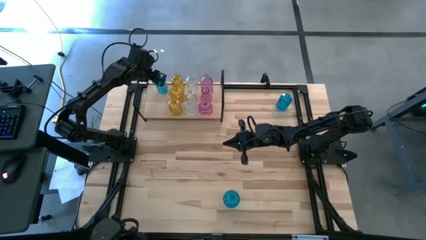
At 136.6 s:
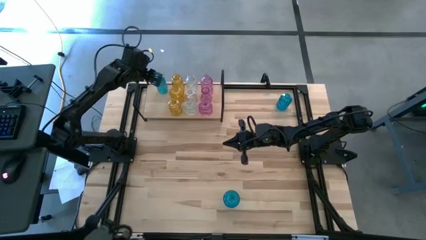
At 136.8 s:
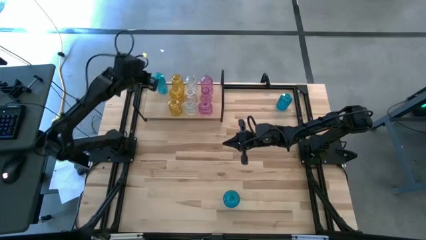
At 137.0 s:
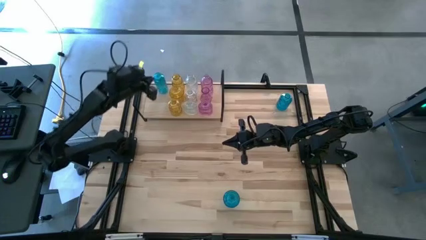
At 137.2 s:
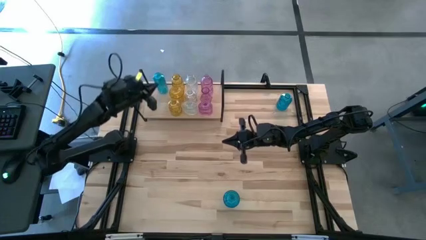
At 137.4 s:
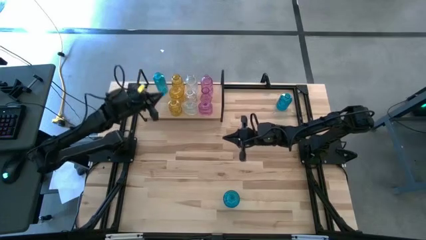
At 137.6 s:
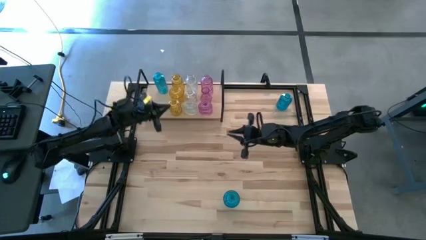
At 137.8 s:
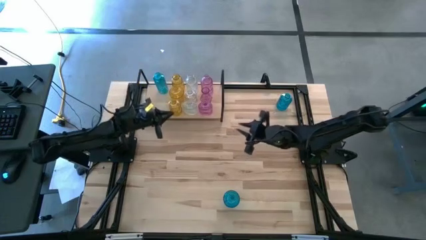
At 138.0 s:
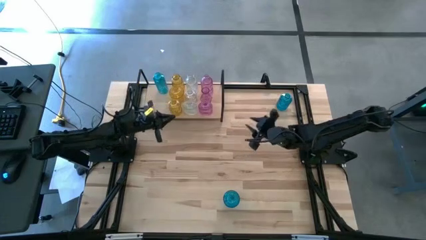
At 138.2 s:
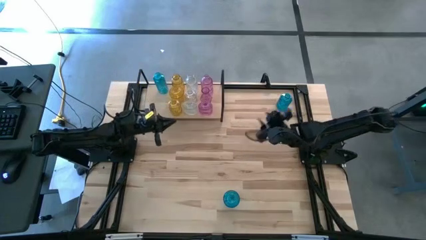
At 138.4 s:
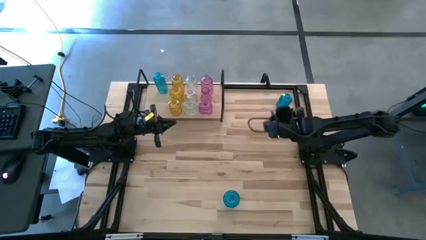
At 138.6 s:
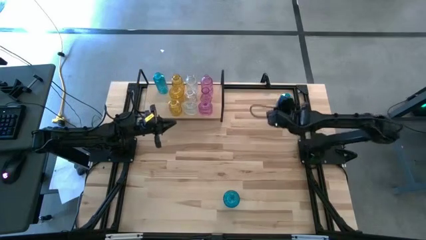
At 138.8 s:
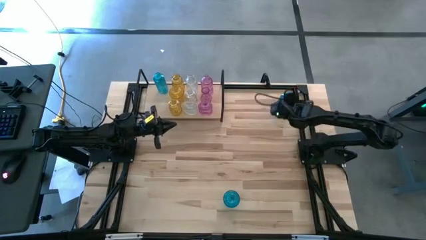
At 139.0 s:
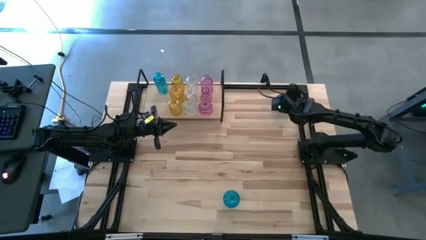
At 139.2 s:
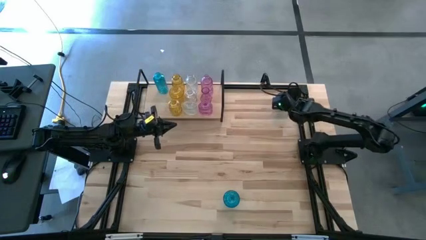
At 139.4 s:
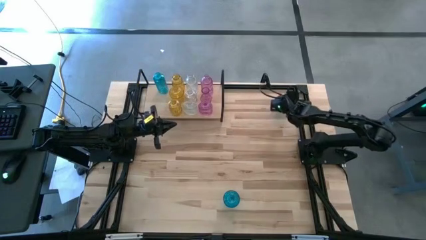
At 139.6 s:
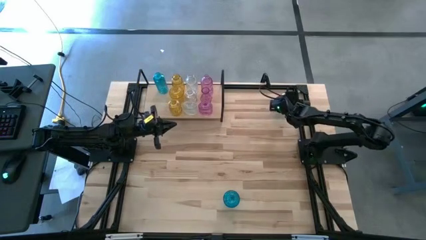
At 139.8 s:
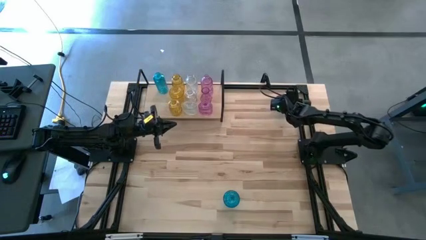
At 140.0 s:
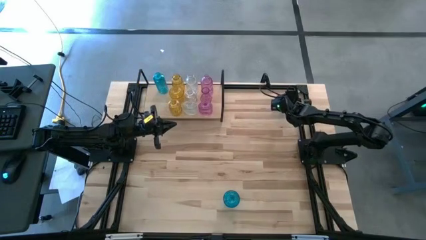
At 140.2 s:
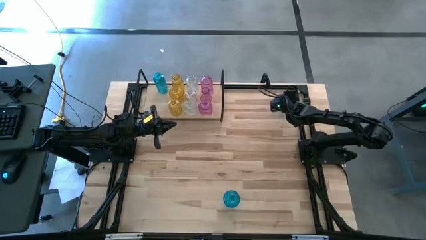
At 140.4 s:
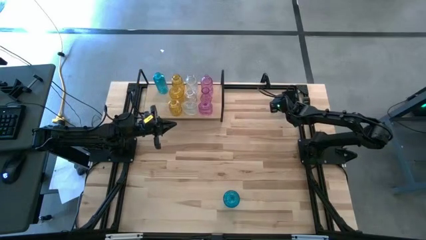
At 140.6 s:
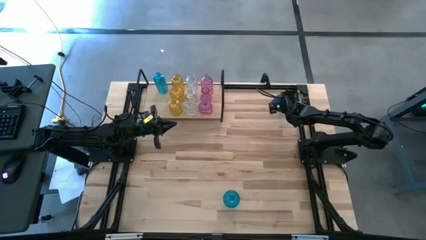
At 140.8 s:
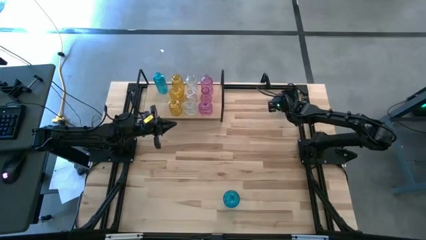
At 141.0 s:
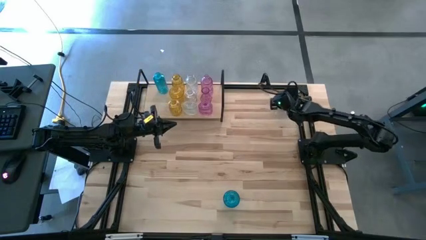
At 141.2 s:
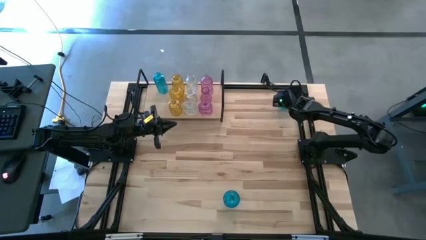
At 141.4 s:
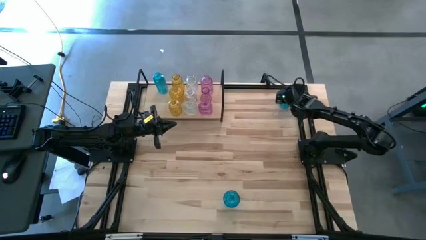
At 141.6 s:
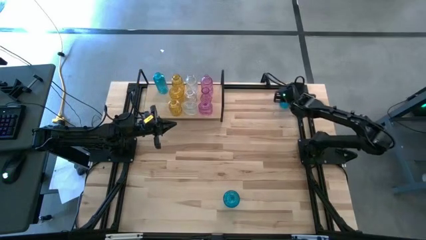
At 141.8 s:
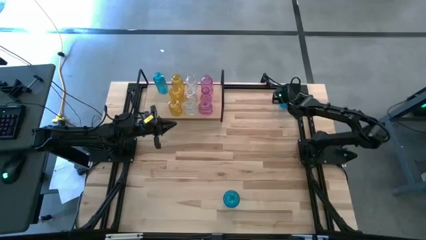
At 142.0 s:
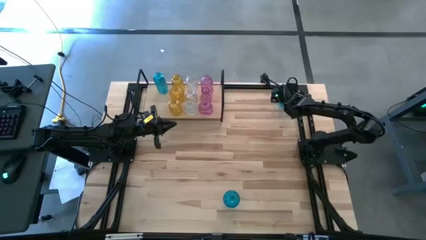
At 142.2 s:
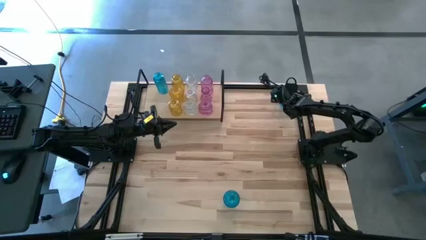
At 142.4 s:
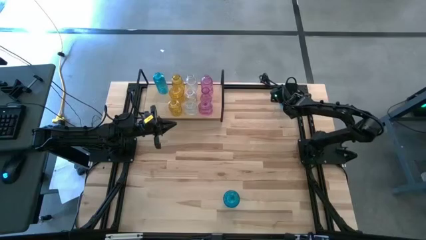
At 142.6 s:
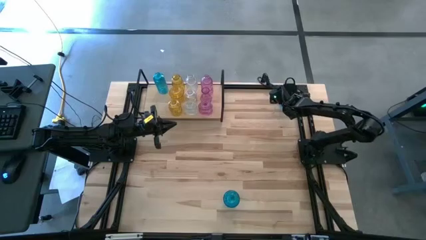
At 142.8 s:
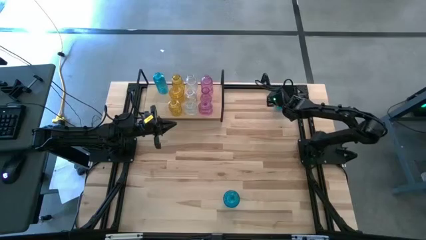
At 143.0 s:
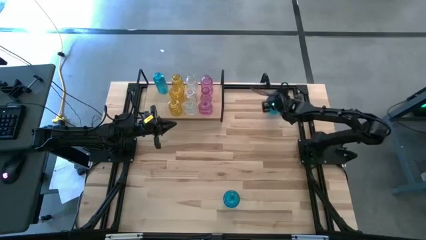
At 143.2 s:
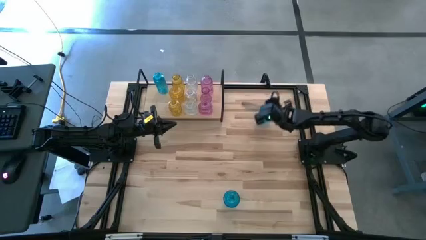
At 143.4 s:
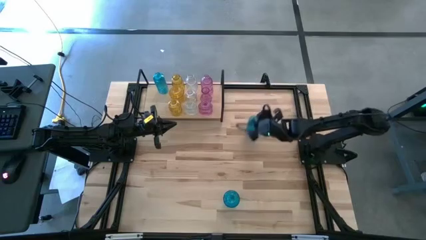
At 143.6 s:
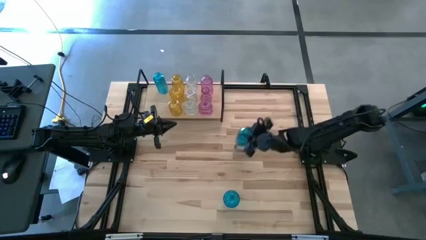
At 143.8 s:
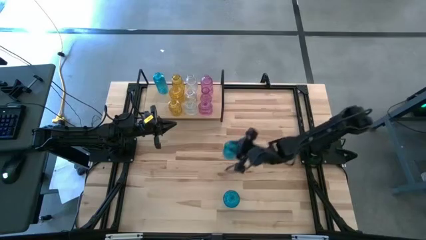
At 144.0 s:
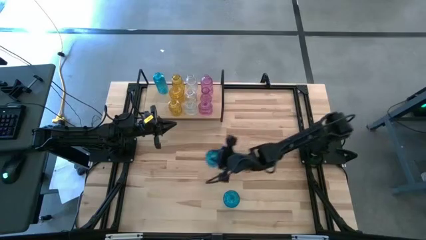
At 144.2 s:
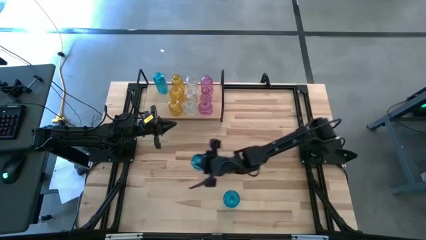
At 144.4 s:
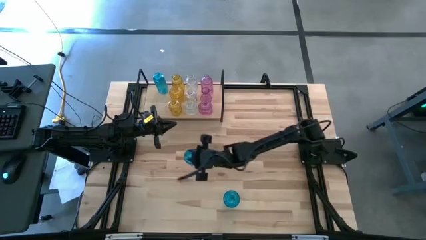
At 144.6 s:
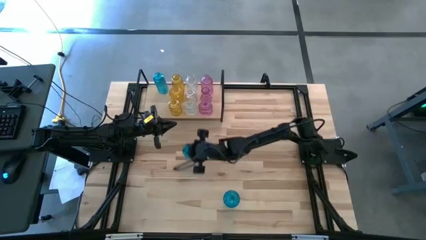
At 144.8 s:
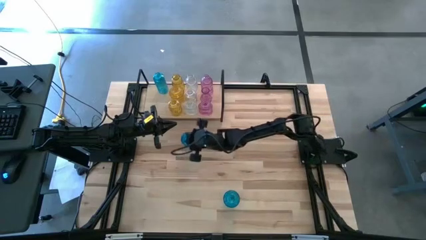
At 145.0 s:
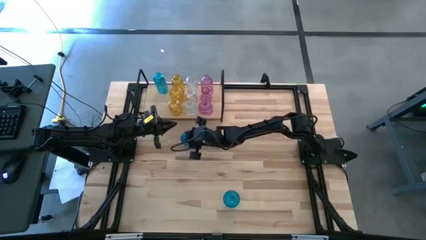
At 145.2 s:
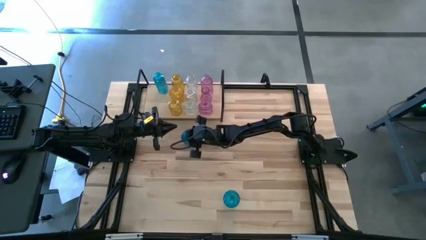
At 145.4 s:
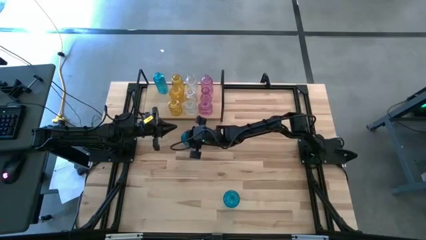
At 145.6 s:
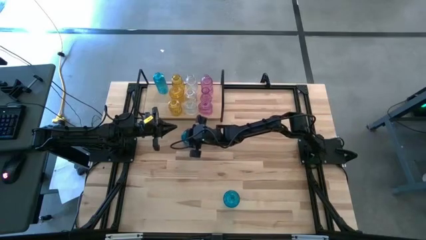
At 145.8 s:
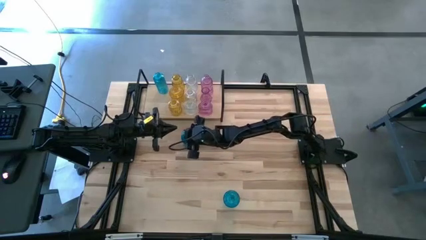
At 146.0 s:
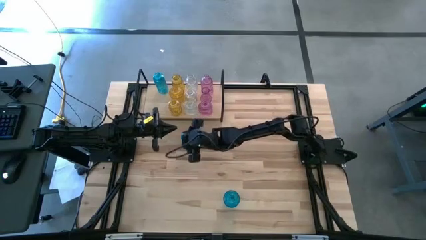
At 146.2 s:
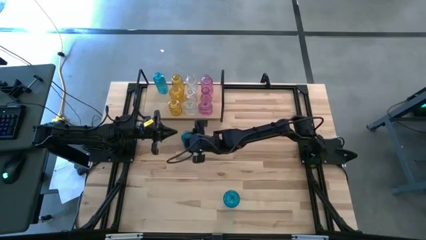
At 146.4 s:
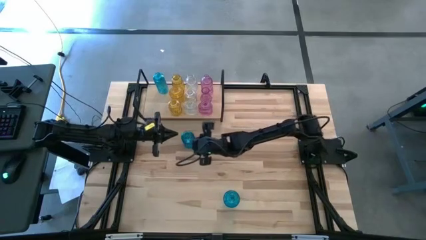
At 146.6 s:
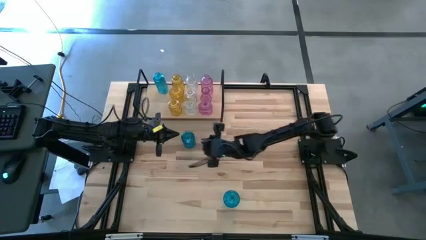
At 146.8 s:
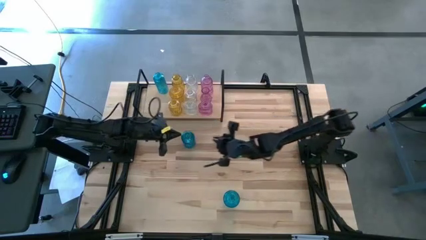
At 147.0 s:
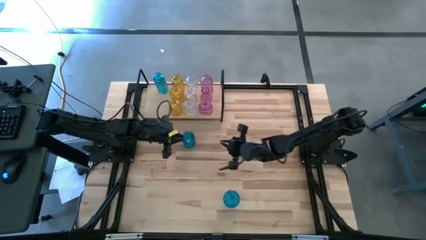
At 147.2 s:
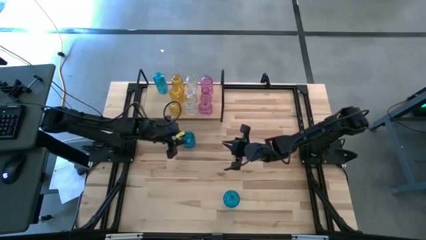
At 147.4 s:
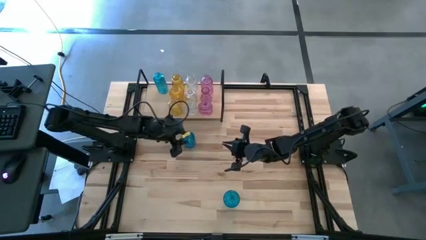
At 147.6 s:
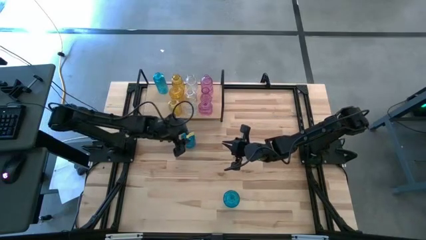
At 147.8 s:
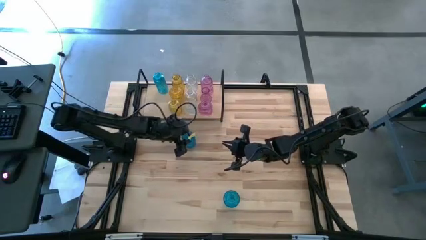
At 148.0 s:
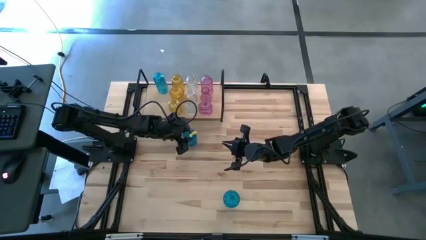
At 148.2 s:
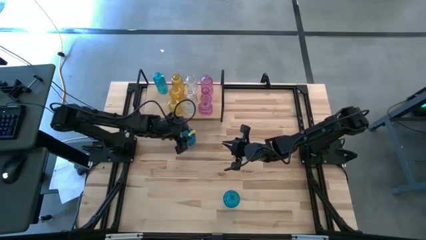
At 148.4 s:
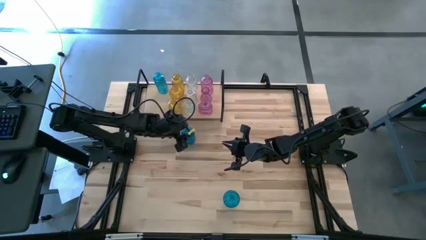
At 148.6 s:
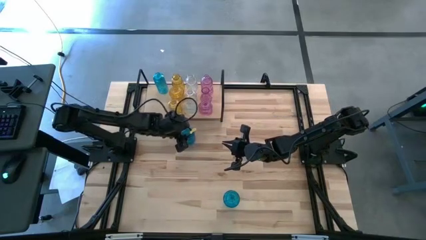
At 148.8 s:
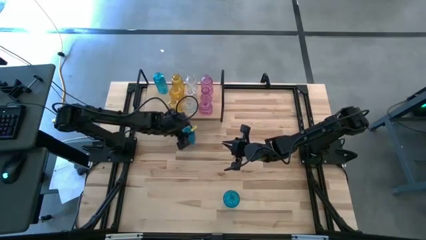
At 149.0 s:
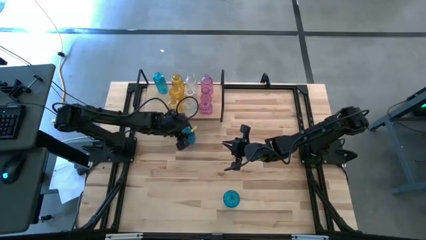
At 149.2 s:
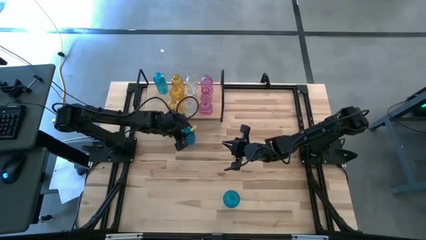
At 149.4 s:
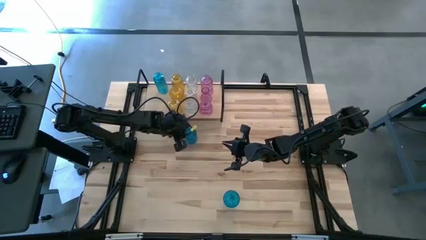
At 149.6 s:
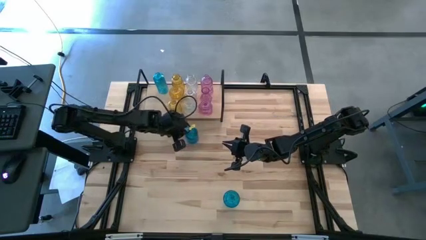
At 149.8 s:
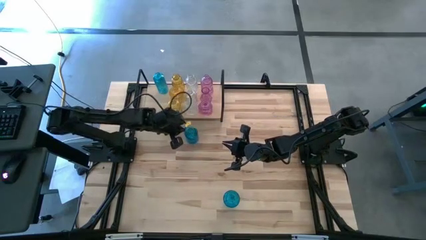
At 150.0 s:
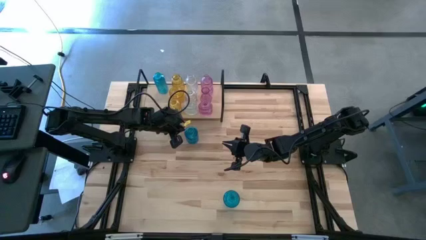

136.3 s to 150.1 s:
Task: sort vases onto shelf
Put the right blue vase on the shelf

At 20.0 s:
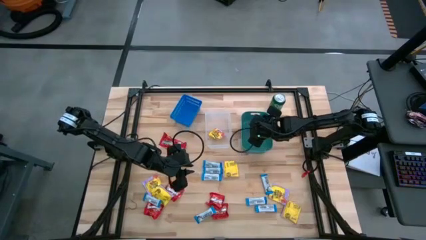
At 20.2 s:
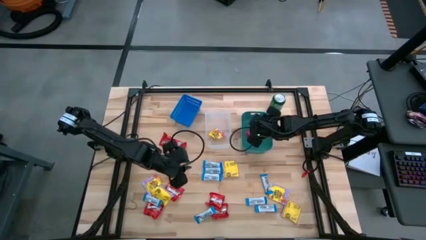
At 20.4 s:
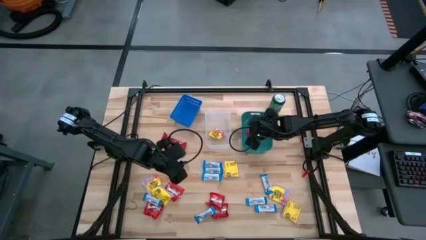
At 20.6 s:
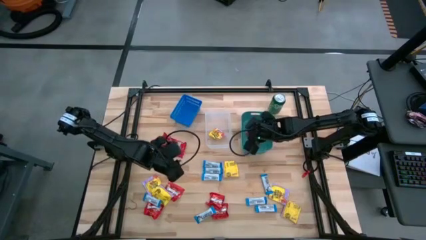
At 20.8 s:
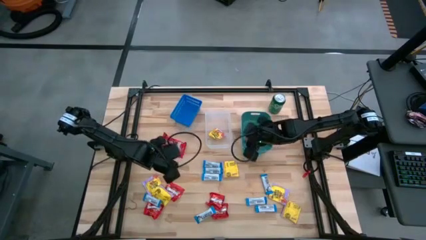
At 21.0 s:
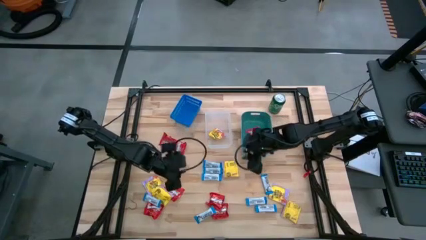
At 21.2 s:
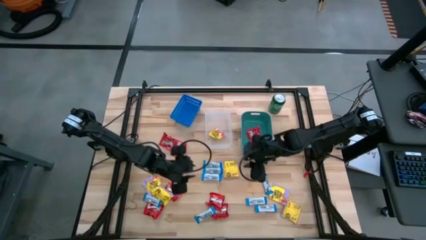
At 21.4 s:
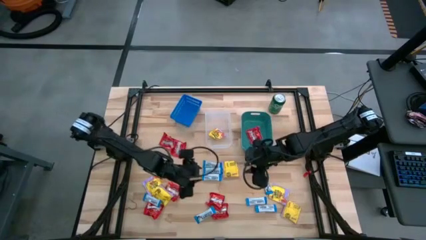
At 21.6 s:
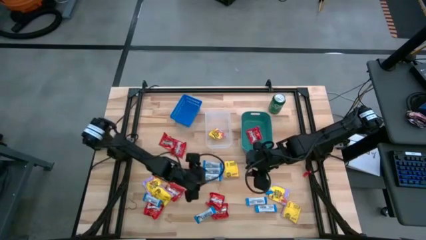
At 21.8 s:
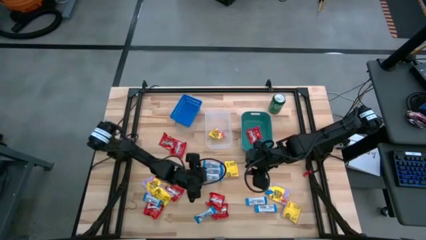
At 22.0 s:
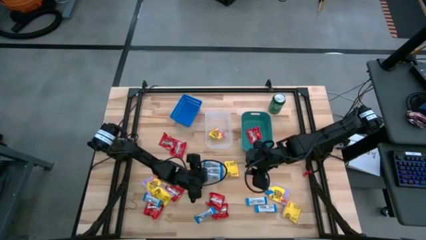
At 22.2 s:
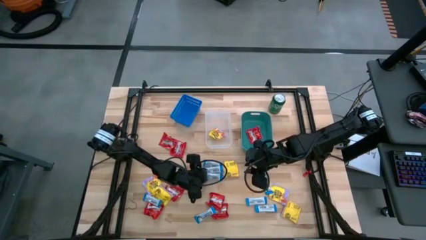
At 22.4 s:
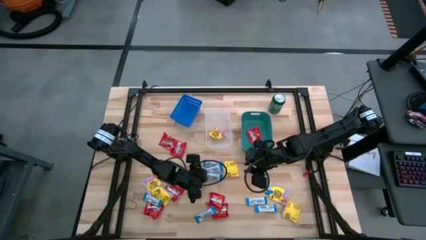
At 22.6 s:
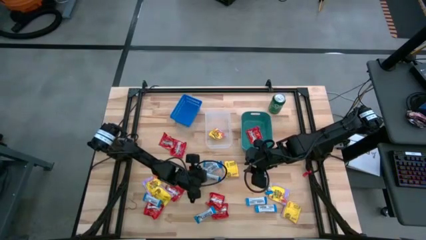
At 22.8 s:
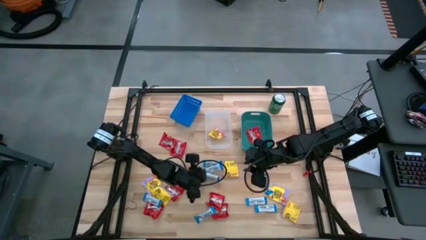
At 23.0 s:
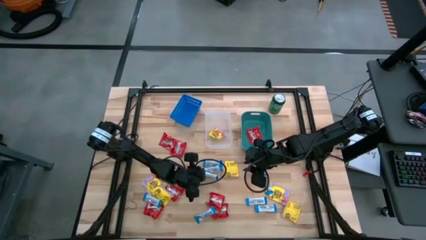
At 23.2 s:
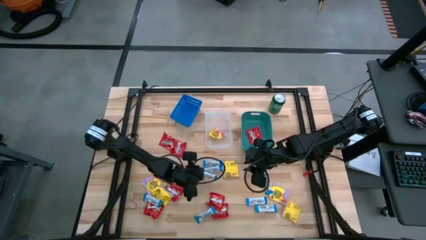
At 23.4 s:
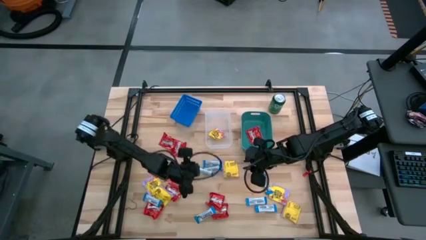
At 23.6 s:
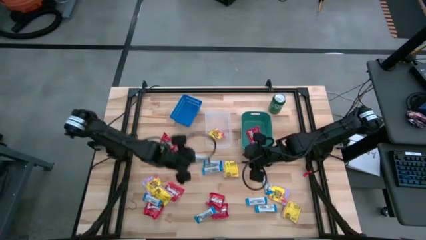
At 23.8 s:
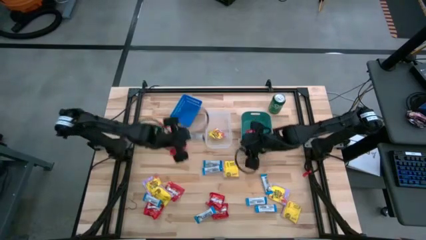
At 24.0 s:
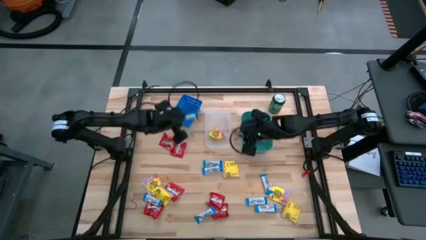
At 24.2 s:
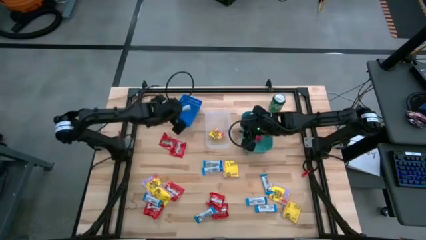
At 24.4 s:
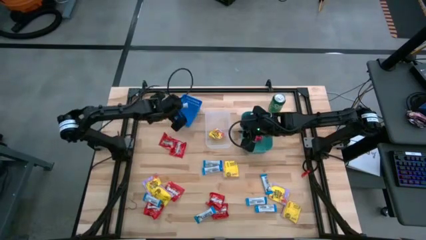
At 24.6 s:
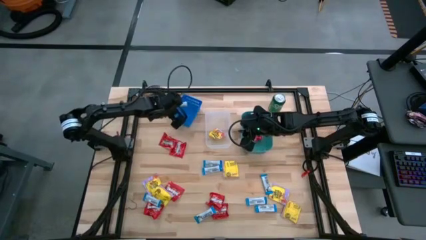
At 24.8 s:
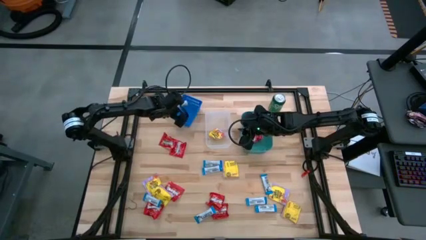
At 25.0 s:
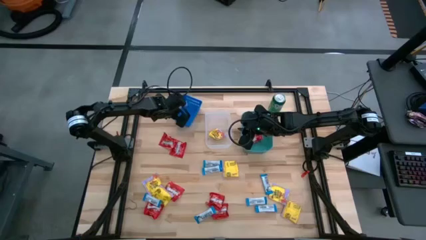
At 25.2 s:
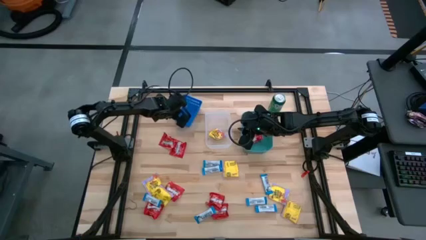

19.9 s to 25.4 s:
Task: Sort candy
Put the white chocolate bar into the blue bin
